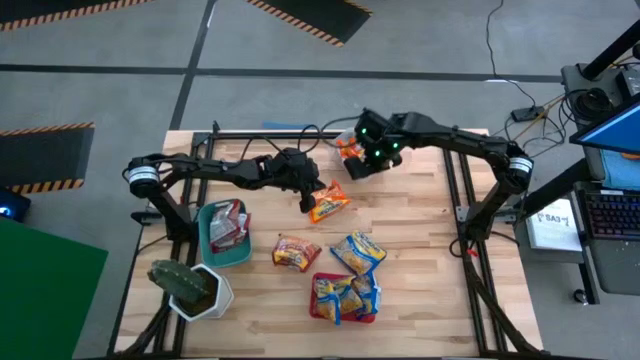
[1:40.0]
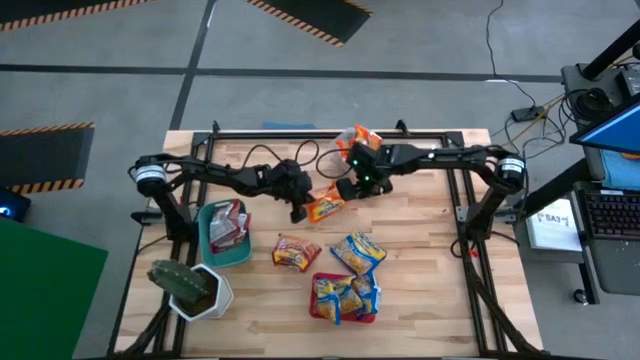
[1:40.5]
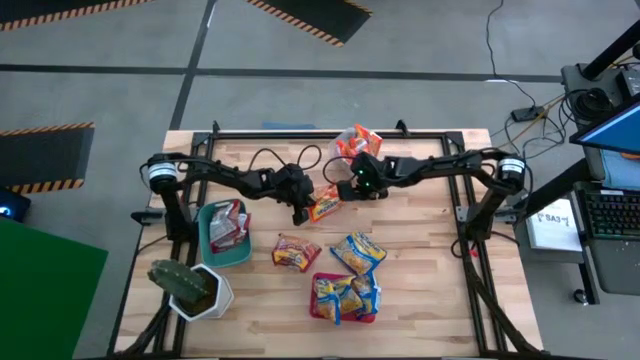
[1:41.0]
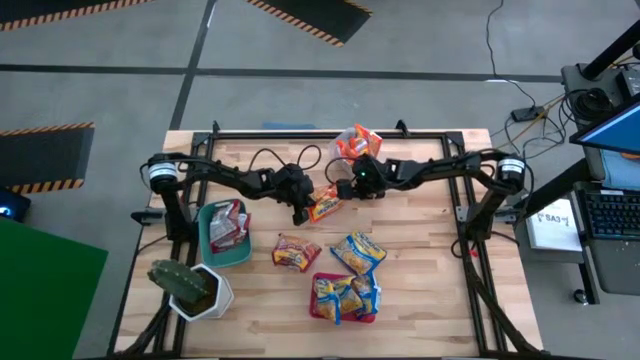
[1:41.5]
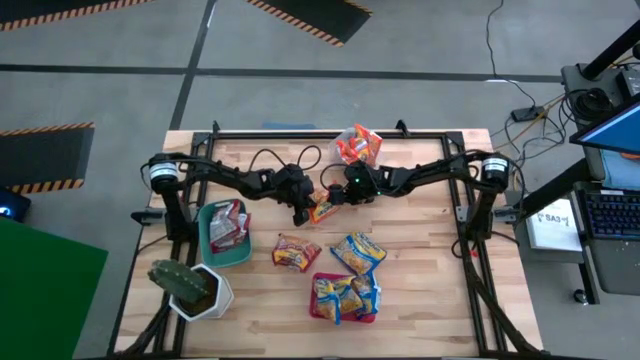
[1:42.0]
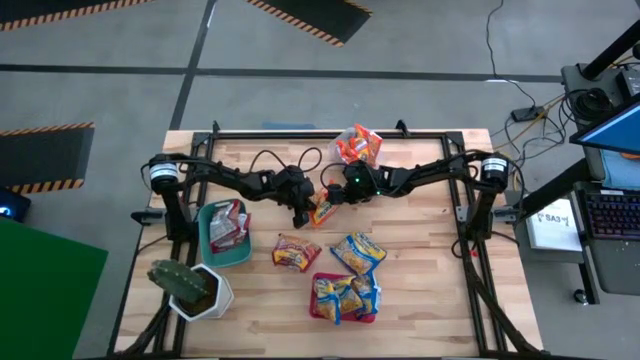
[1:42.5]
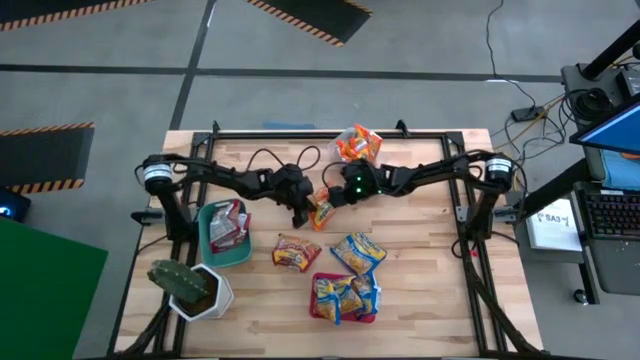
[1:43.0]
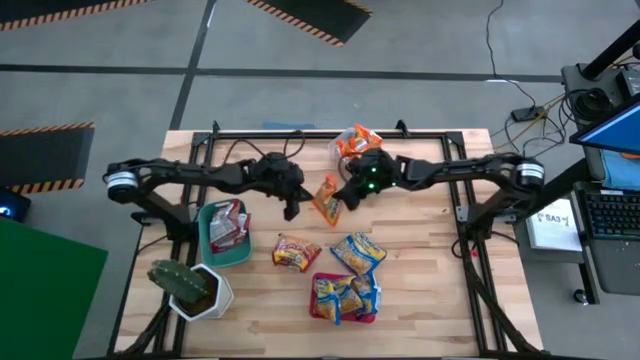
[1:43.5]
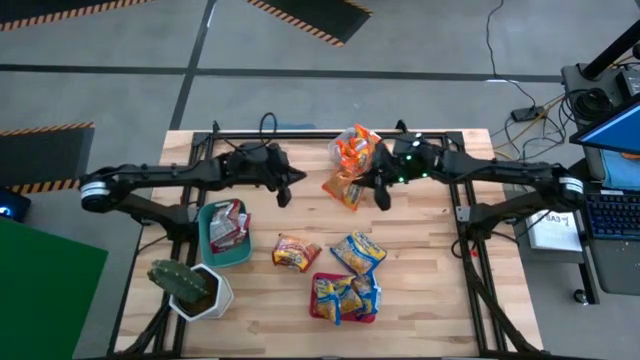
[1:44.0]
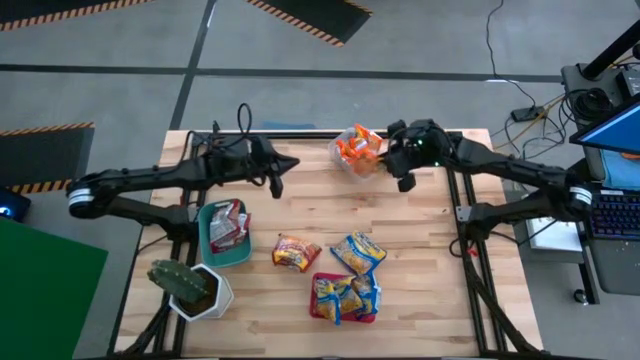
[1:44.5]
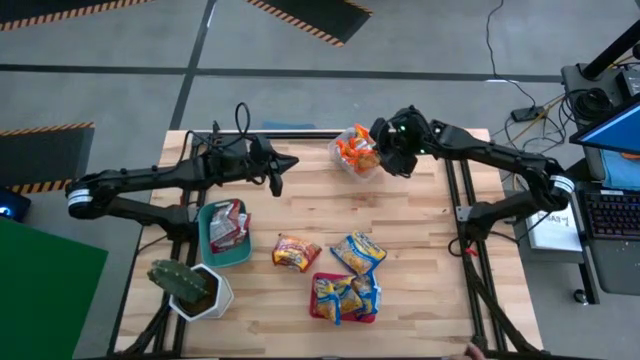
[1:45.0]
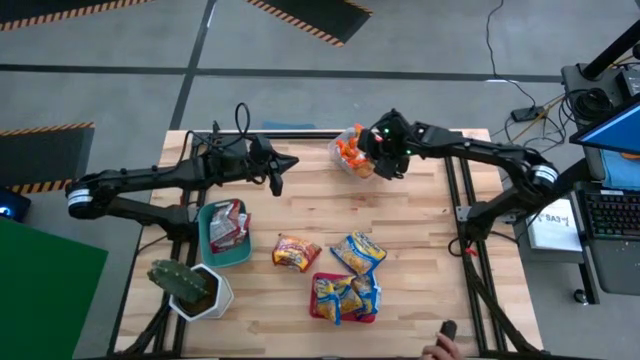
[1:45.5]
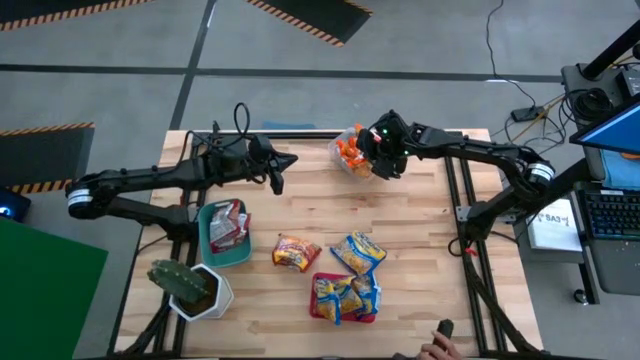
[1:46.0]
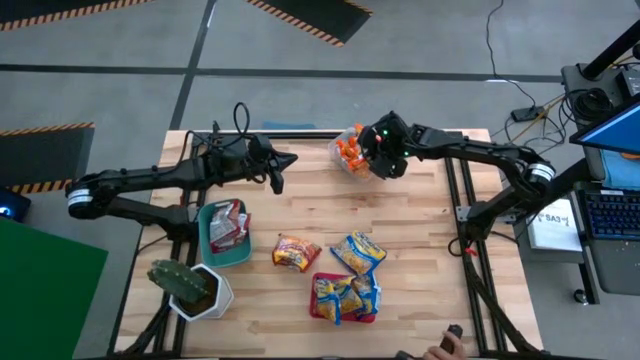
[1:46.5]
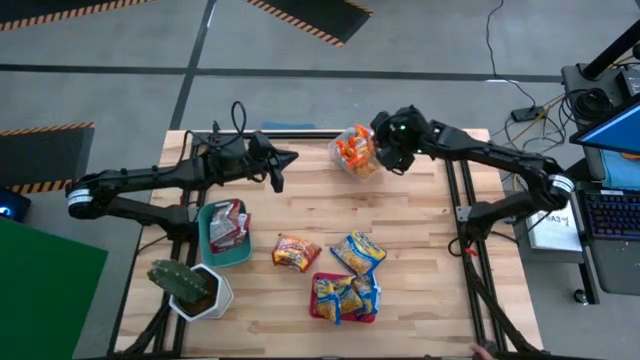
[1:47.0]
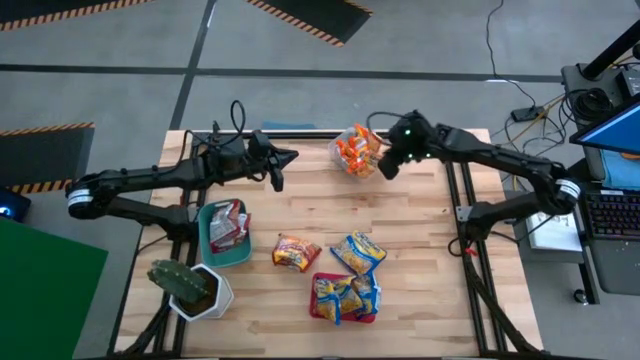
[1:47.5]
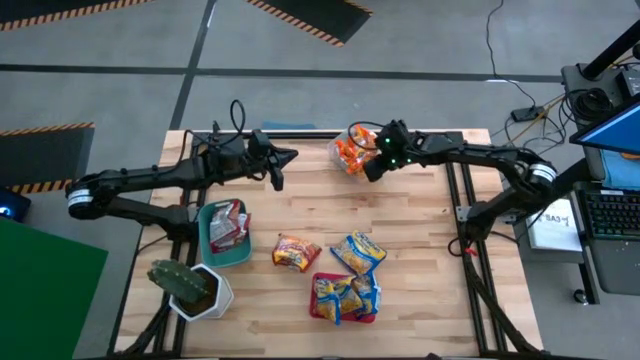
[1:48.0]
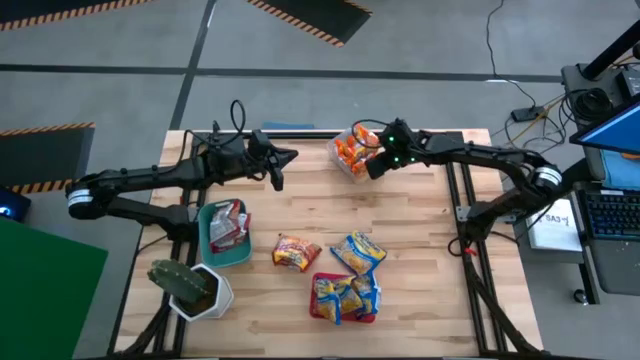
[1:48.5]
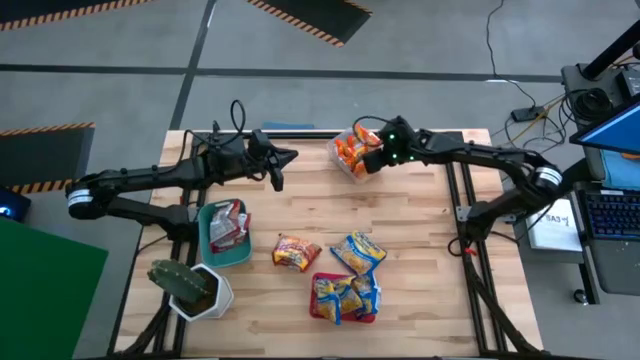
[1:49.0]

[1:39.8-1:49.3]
Task: Sort Maruchan noodles
Put the orange noodle pack into the transparent bin

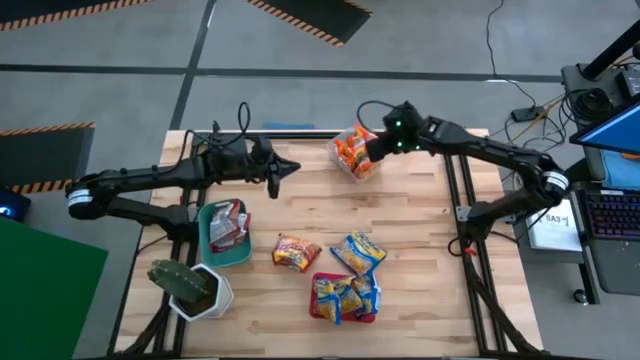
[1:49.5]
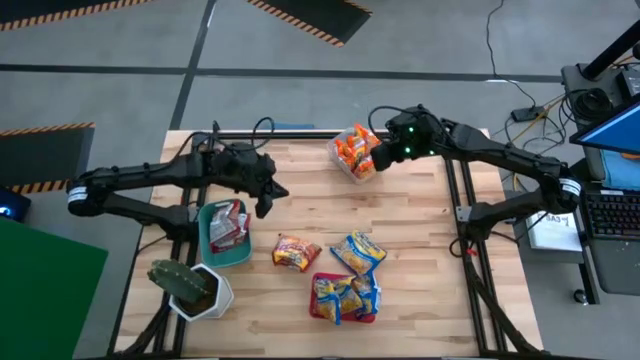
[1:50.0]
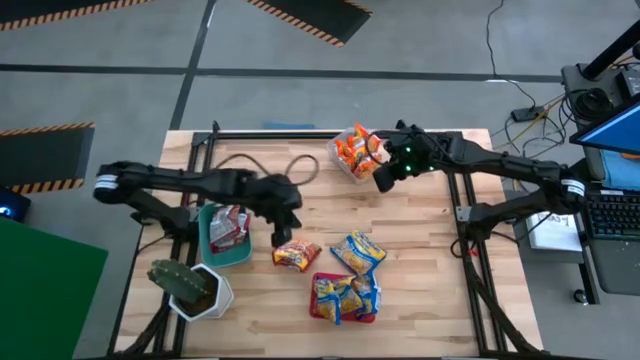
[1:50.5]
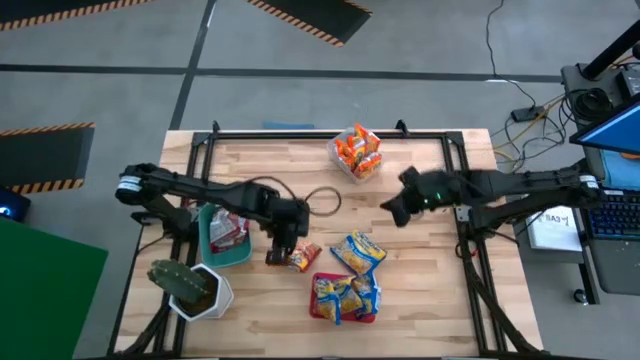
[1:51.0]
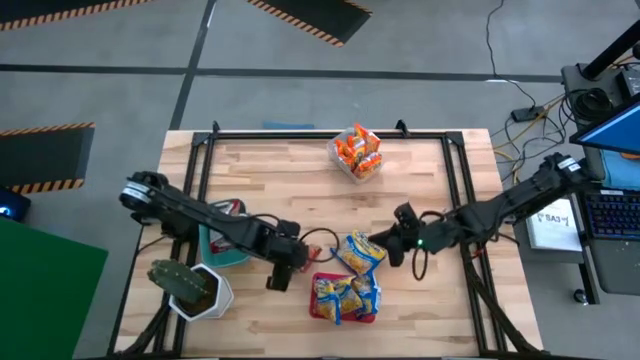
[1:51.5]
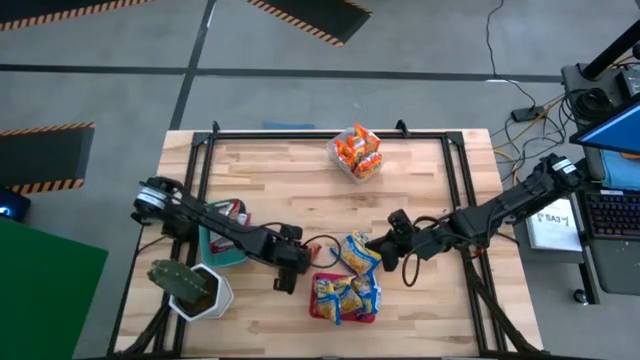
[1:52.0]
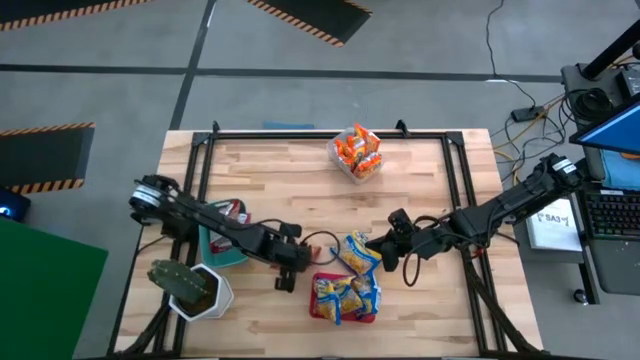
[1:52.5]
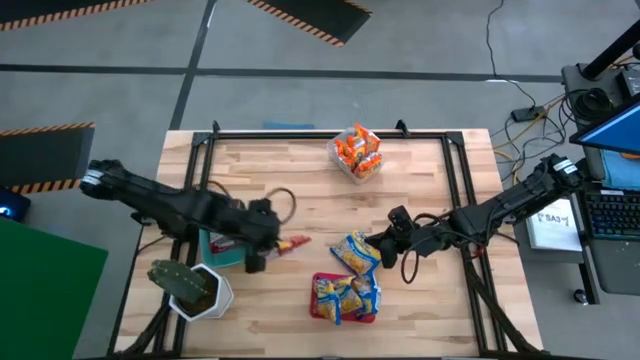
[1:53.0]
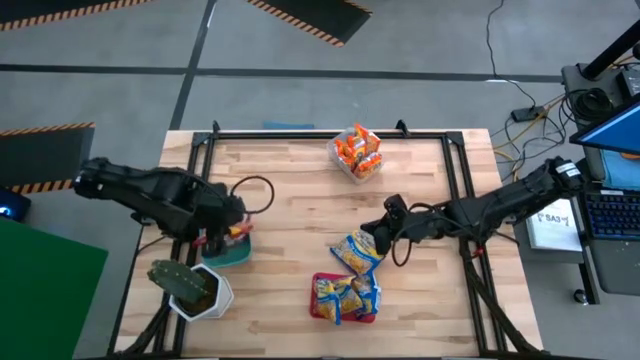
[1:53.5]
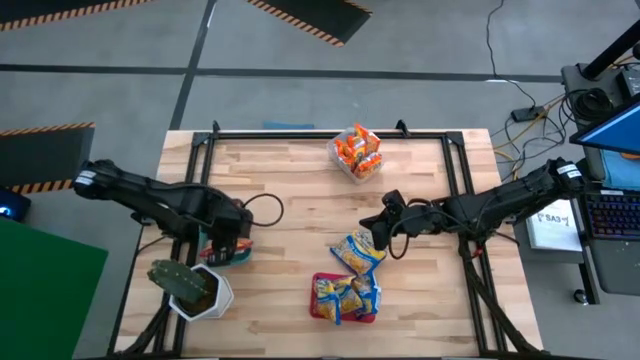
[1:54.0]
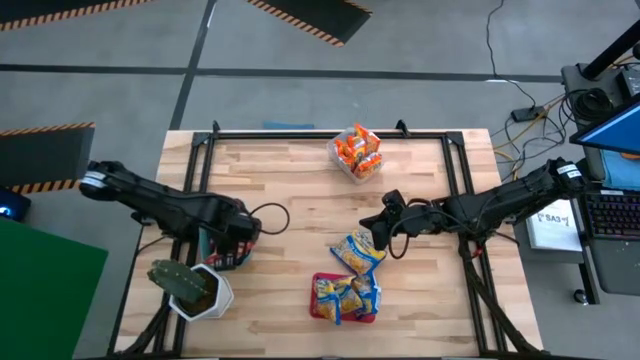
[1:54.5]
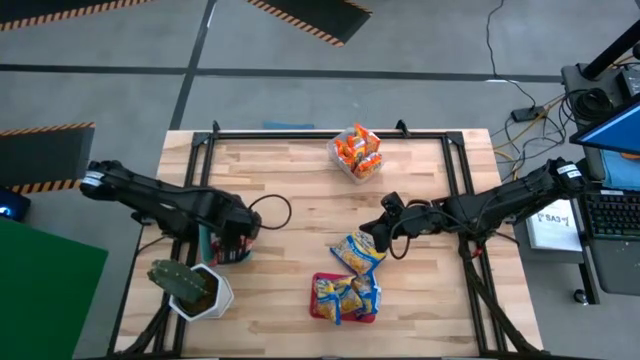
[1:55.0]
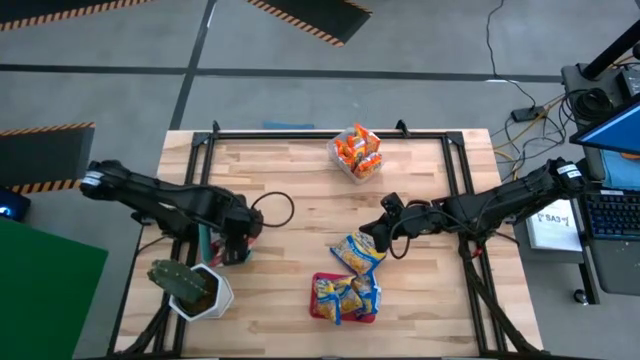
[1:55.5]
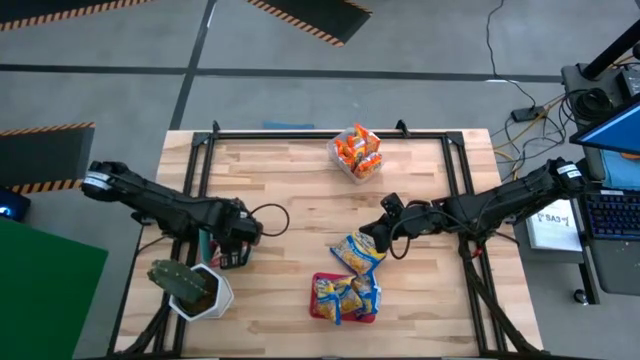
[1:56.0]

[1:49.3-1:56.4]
Put the red noodle pack into the green bin

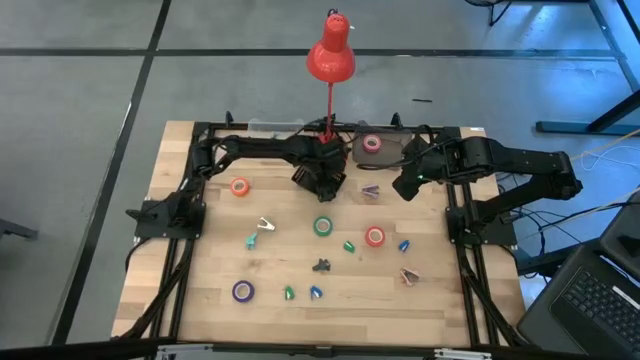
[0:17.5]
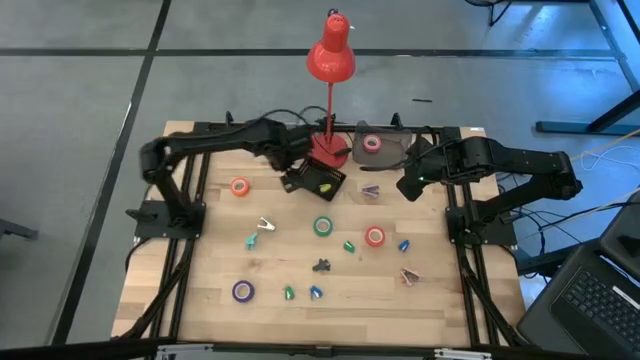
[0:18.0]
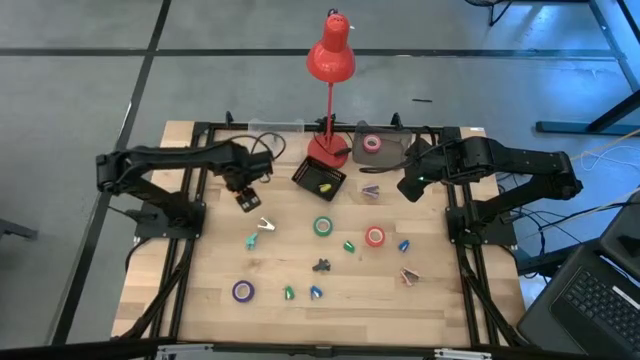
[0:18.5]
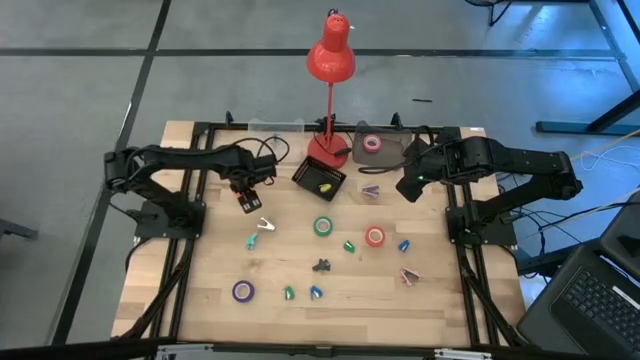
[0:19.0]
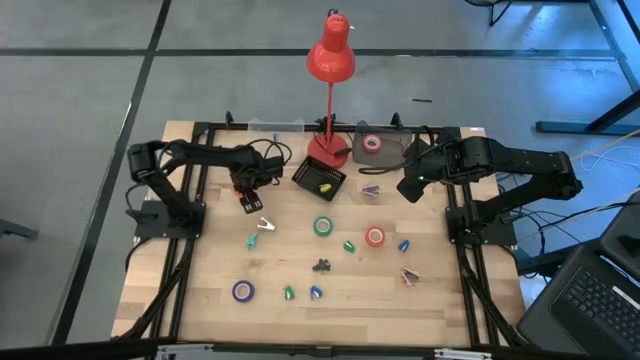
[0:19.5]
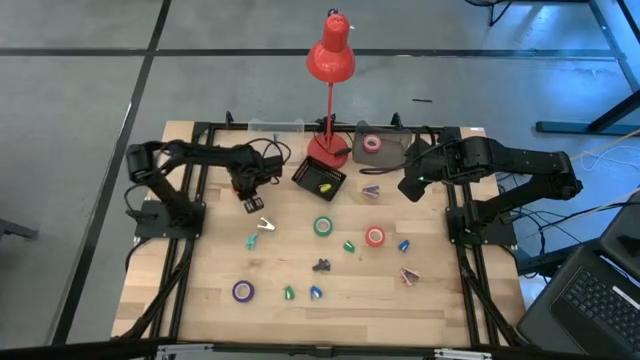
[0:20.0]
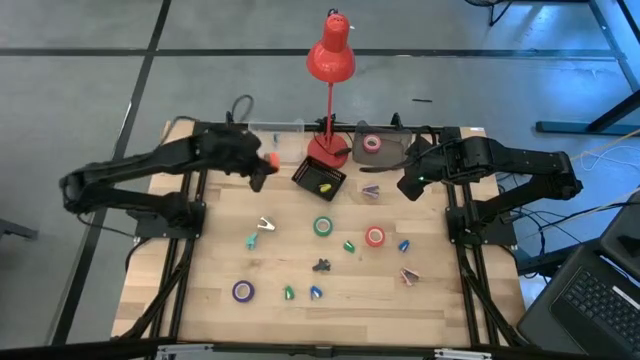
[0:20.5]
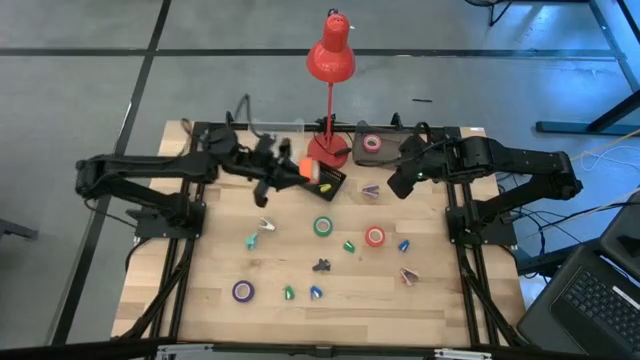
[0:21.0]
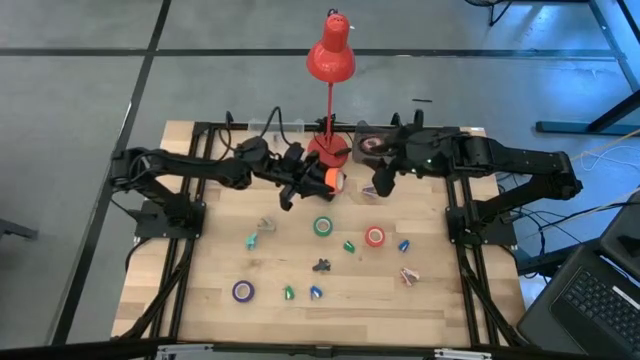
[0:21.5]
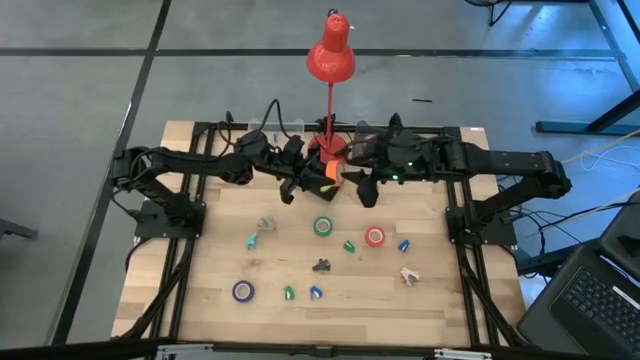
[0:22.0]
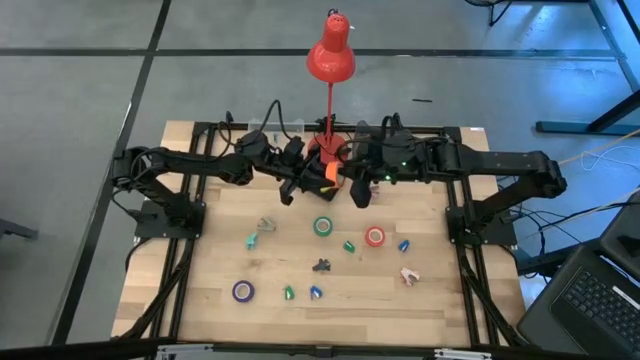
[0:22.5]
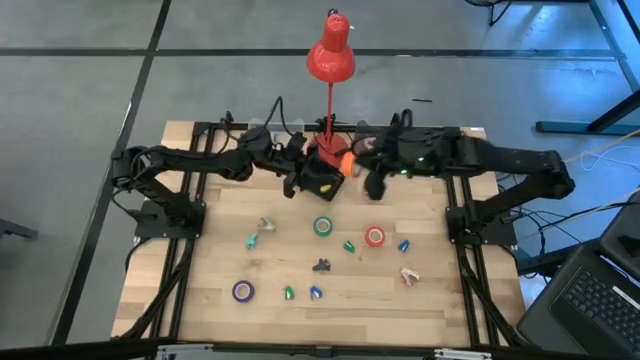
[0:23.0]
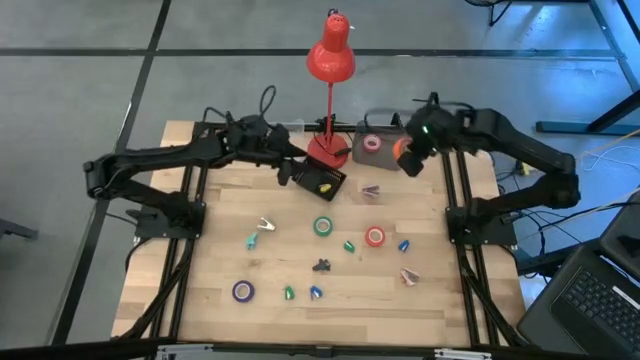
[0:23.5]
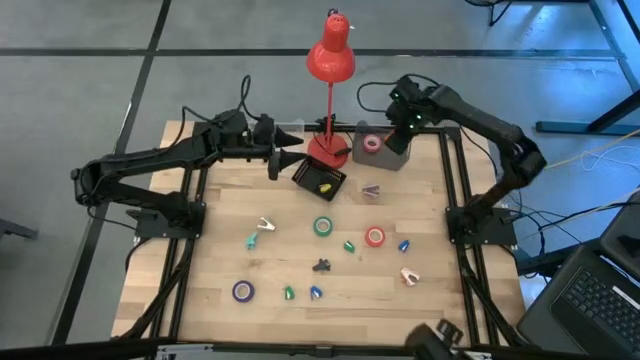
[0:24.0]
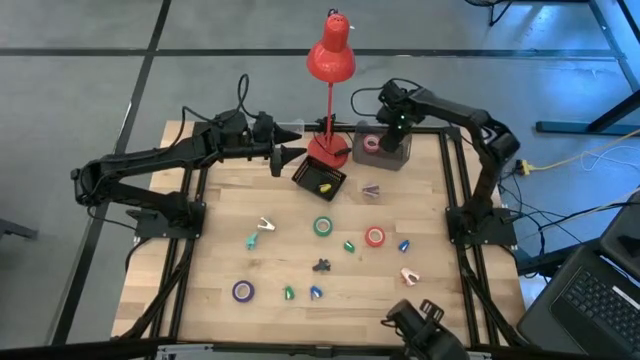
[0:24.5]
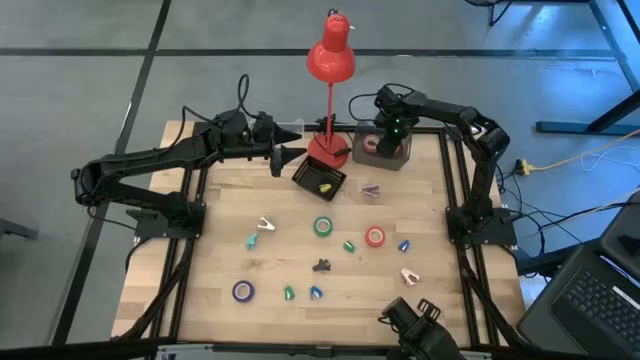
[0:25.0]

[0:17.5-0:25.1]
Task: Pick and place Stapler, Stapler remover, tape
Put the orange tape into the gray bin
